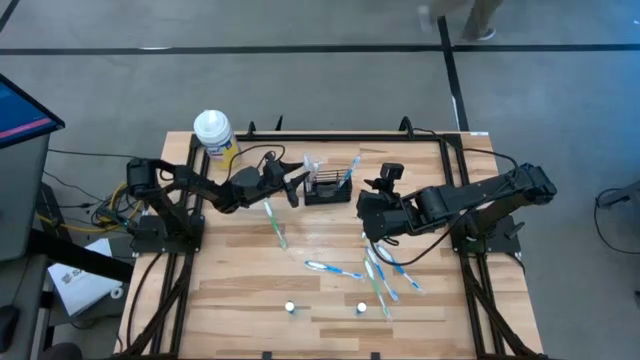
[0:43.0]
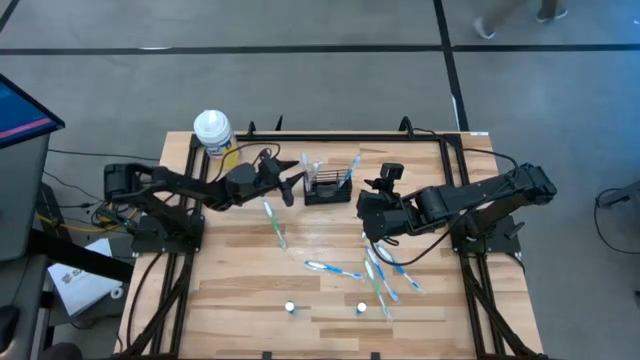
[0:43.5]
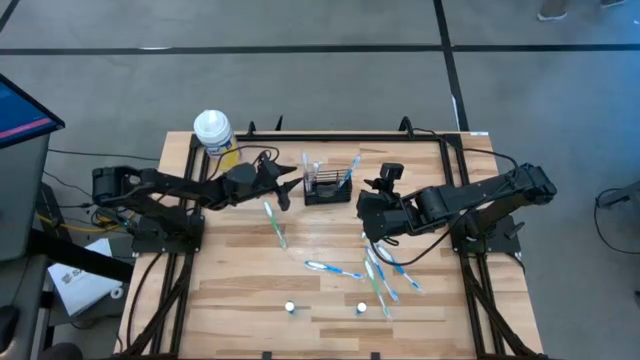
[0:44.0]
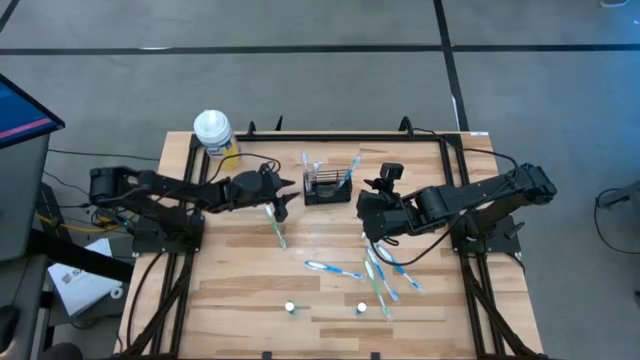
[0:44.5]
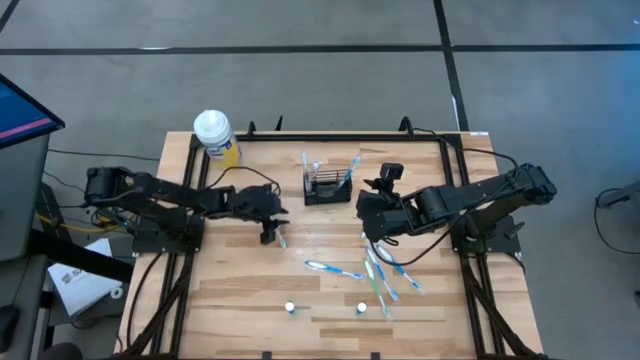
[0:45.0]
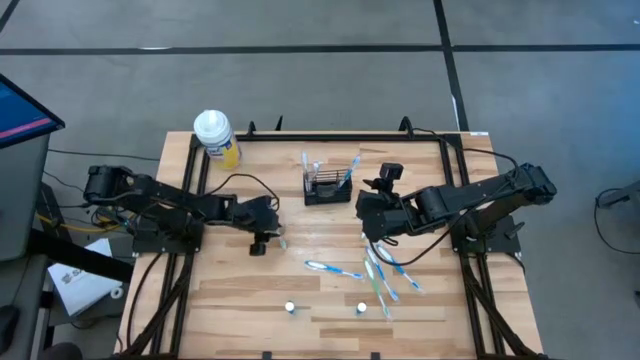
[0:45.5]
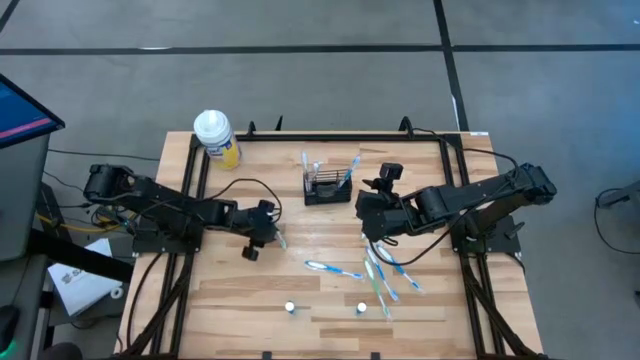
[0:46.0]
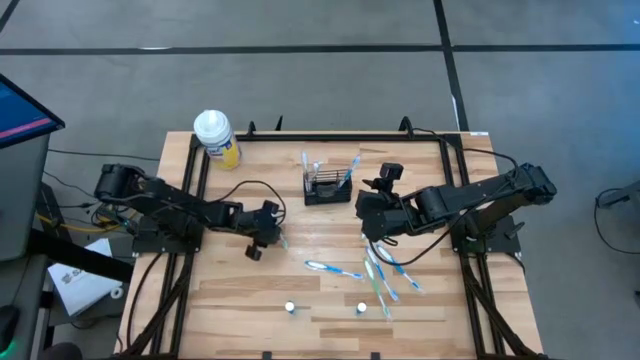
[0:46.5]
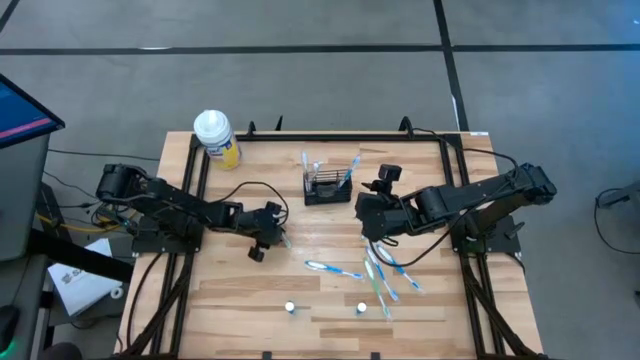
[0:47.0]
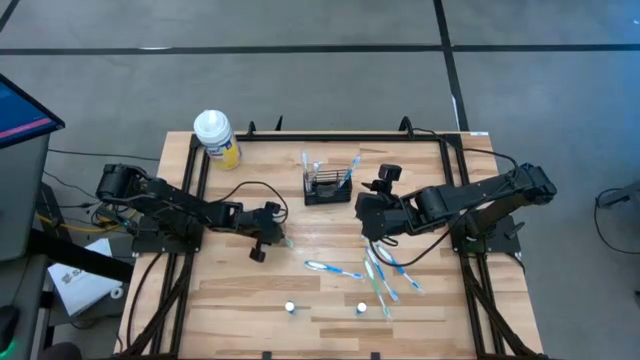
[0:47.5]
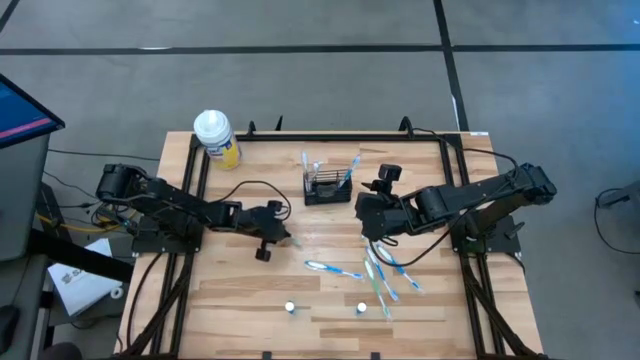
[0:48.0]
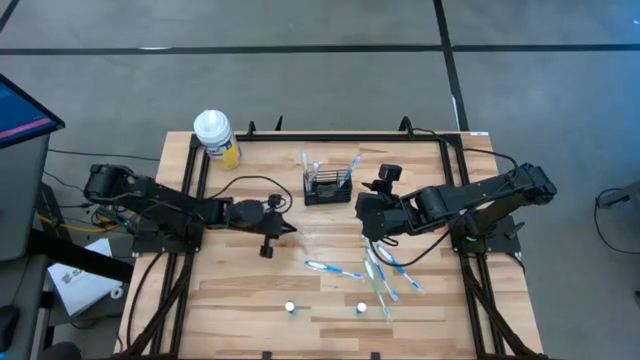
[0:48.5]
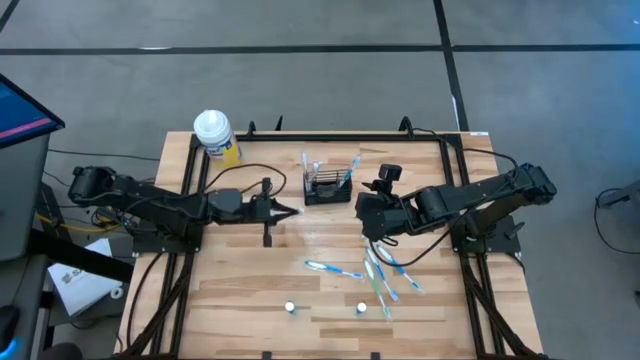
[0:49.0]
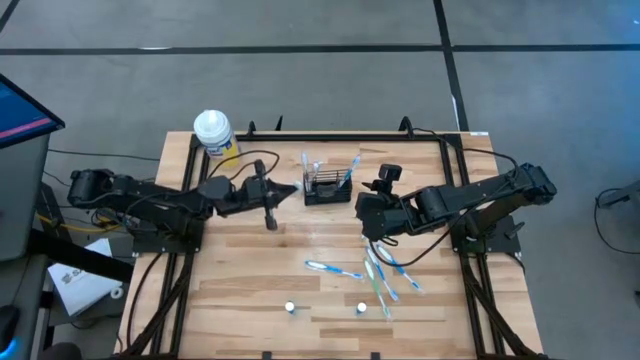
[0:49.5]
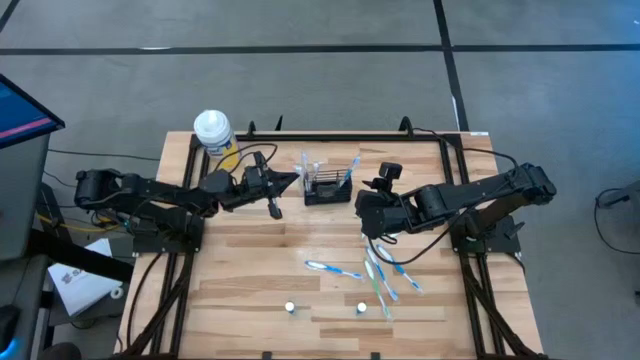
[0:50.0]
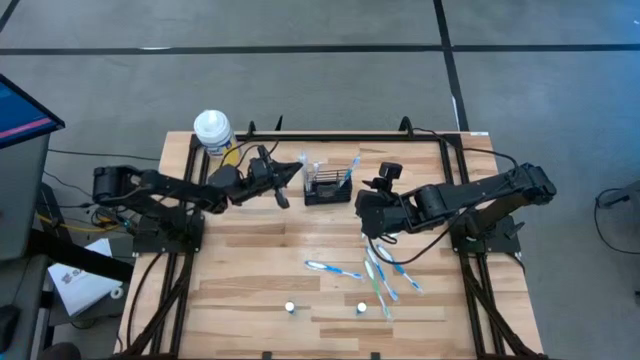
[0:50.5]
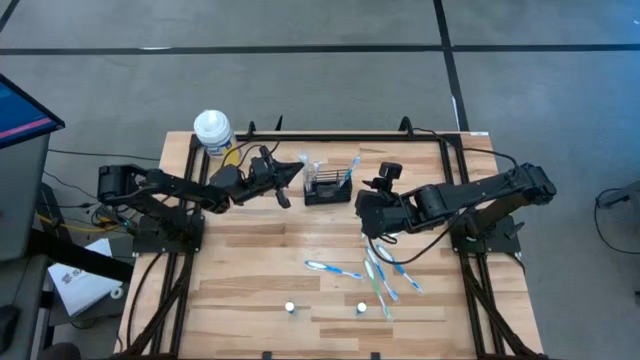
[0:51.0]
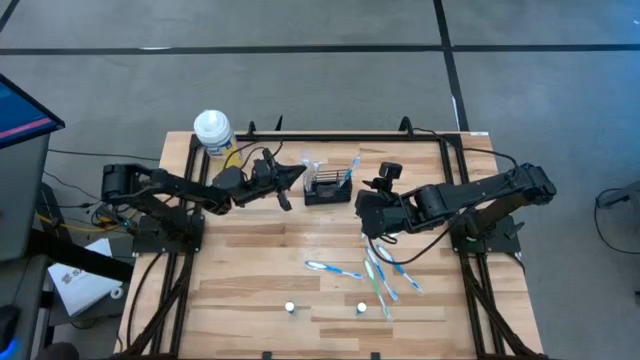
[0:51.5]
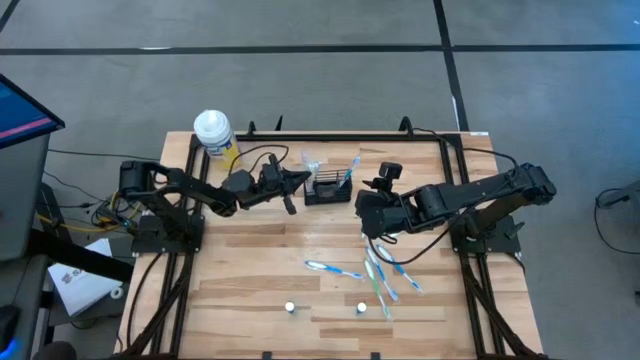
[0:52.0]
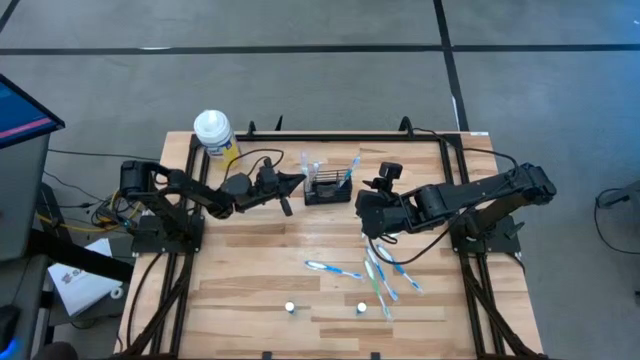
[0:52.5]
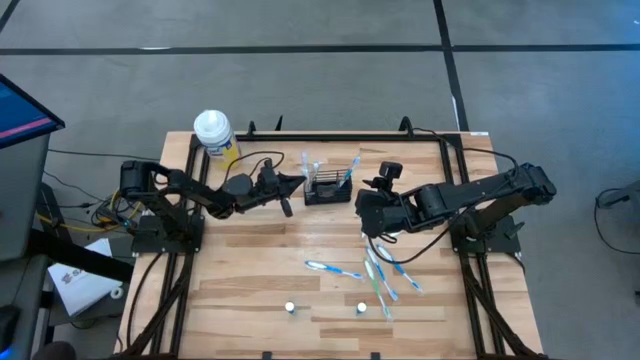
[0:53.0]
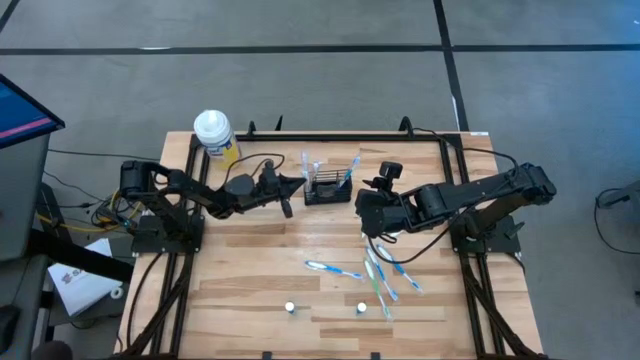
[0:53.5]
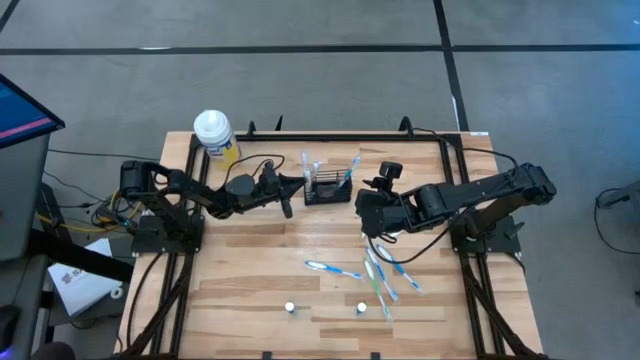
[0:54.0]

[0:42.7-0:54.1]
Task: Pick & Place toothbrushing station
Put the green toothbrush into the black mesh organizer

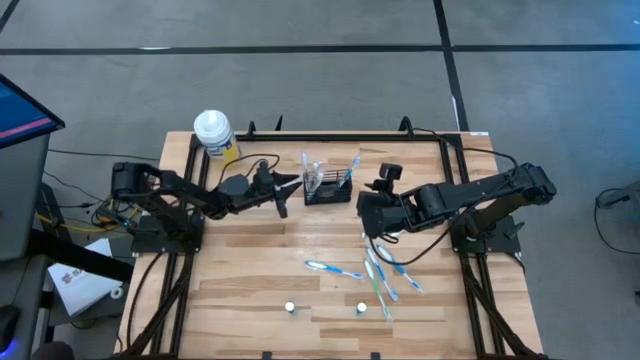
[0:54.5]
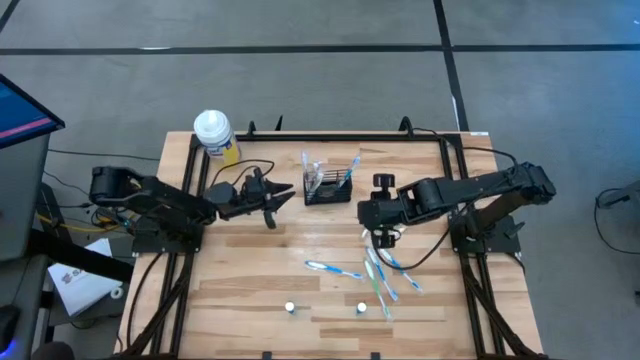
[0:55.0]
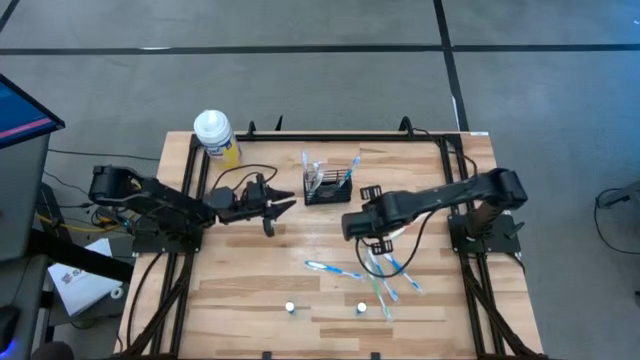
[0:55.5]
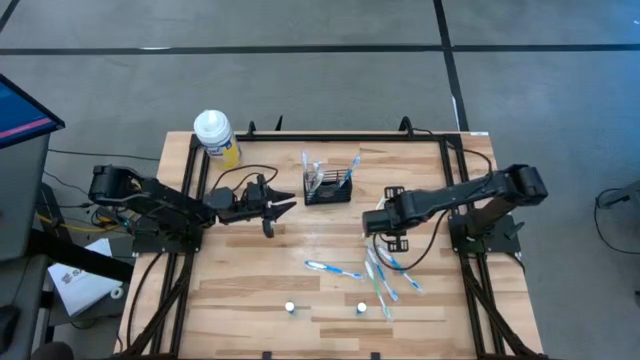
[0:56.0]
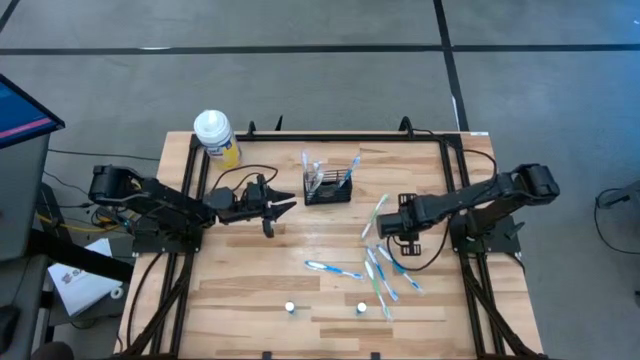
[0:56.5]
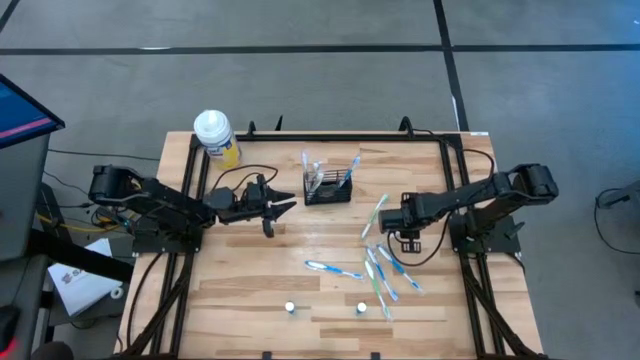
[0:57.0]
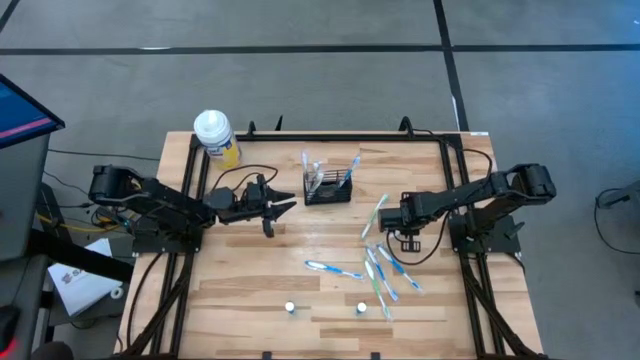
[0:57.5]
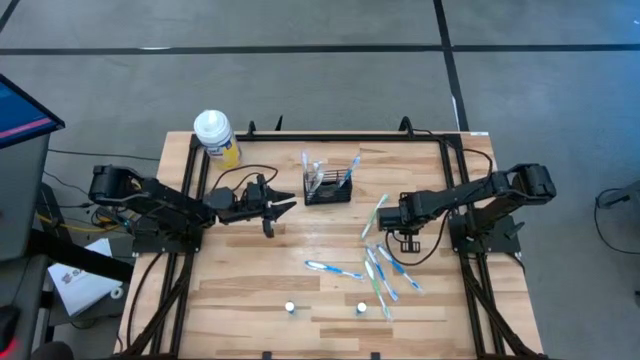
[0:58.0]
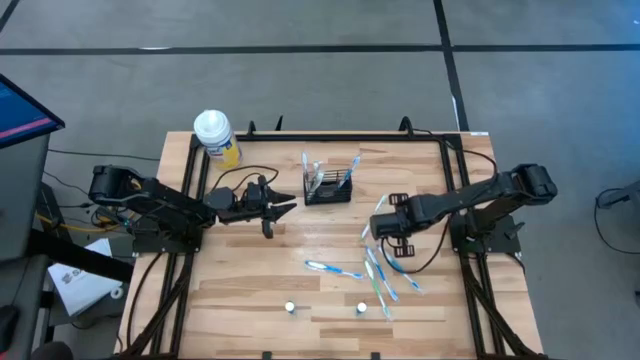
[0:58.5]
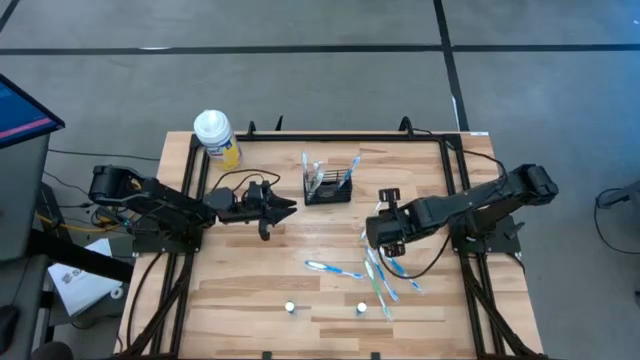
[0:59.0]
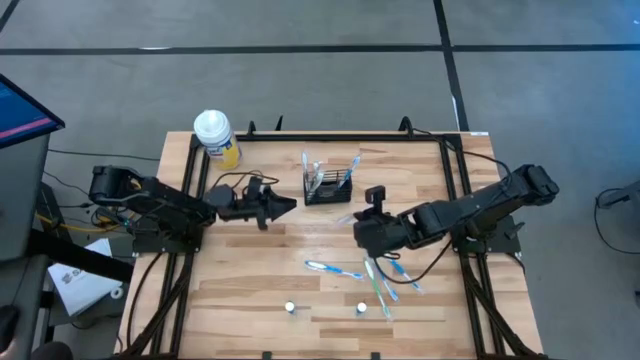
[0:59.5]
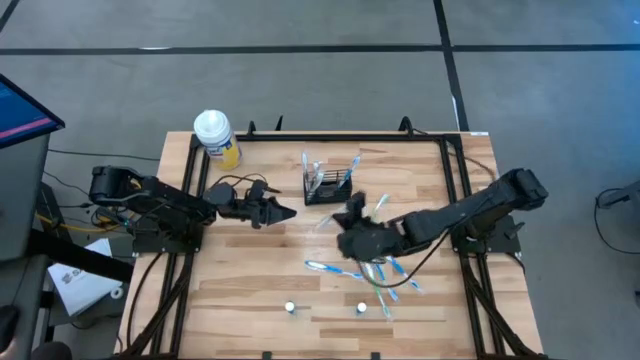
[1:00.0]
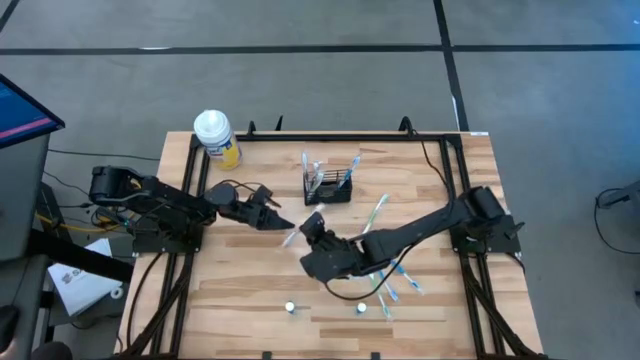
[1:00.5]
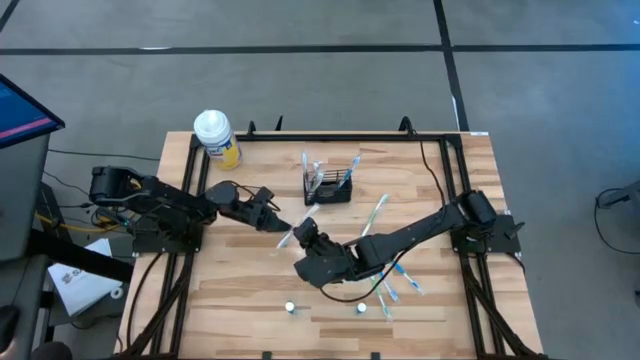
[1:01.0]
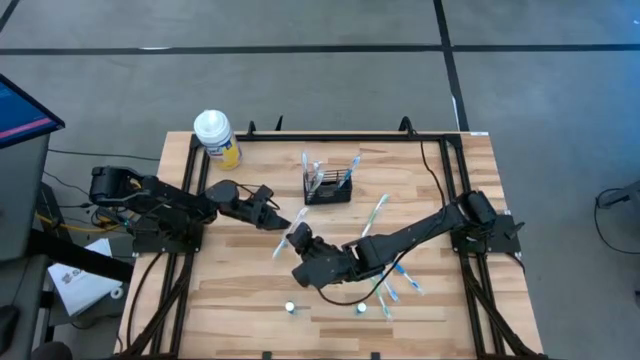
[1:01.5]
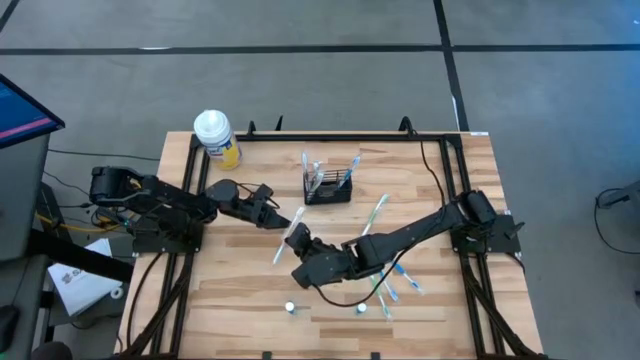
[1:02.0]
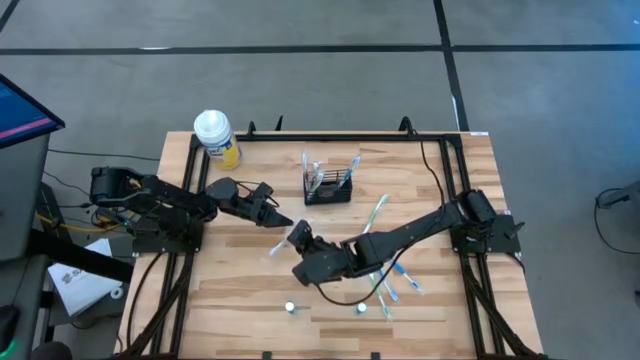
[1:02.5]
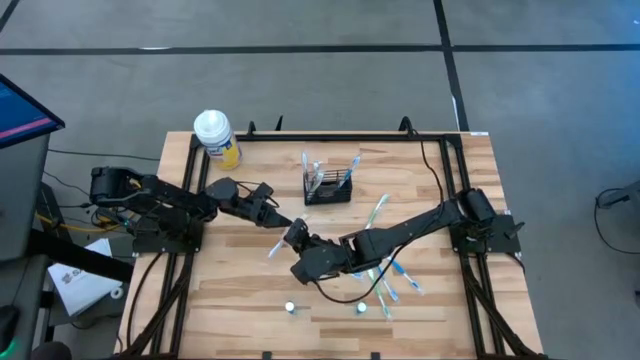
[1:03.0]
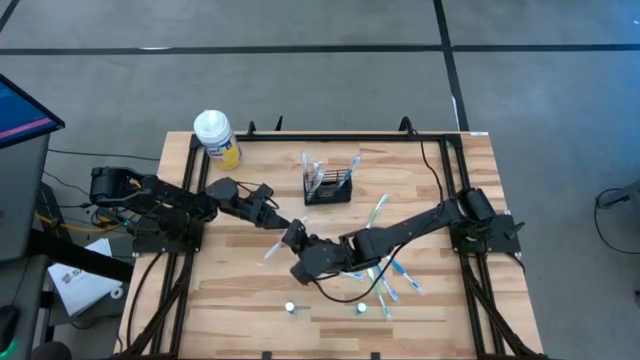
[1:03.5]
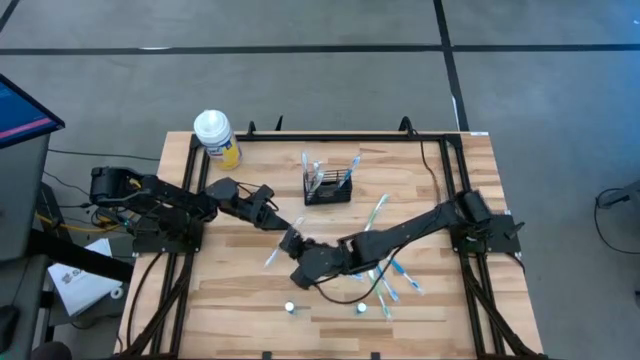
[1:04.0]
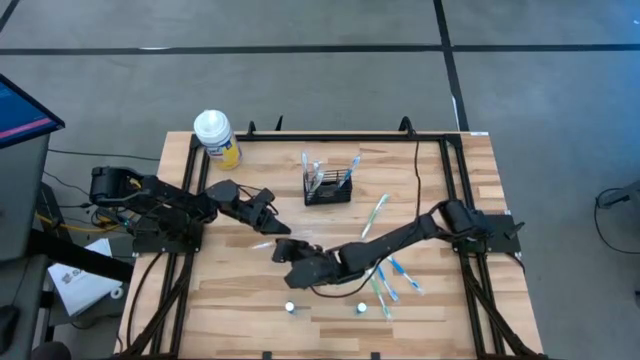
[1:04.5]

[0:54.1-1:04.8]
Put the orange toothbrush into the black mesh organizer
